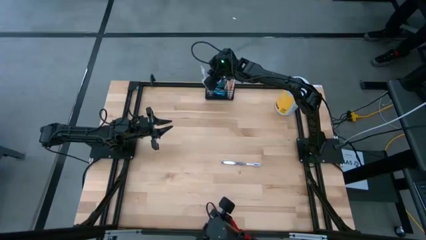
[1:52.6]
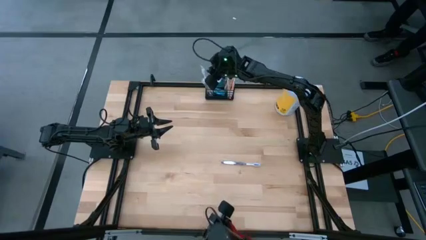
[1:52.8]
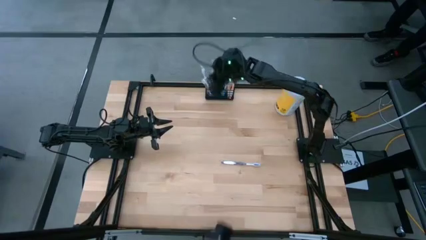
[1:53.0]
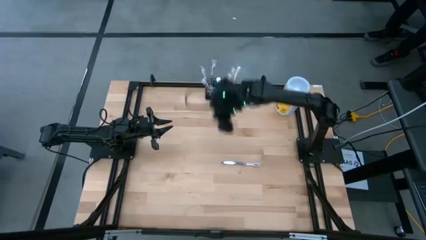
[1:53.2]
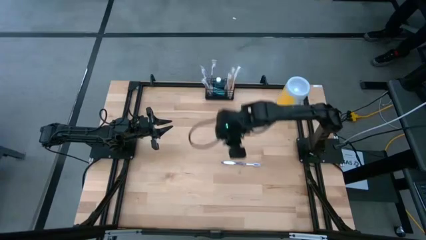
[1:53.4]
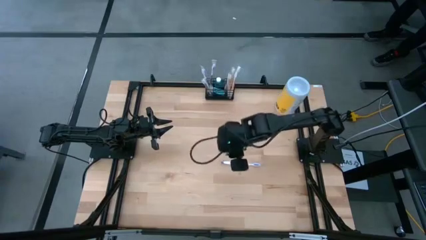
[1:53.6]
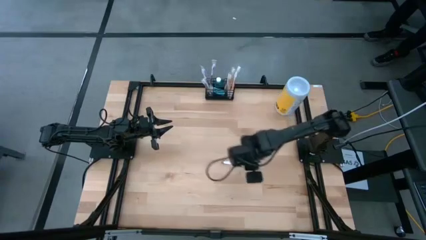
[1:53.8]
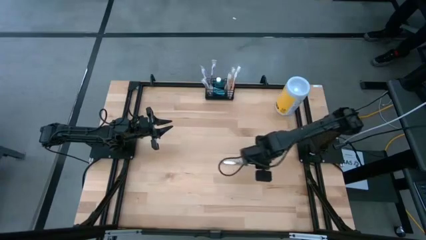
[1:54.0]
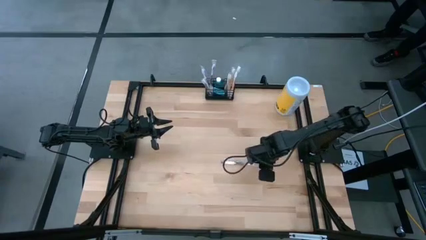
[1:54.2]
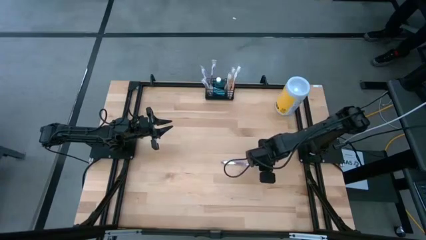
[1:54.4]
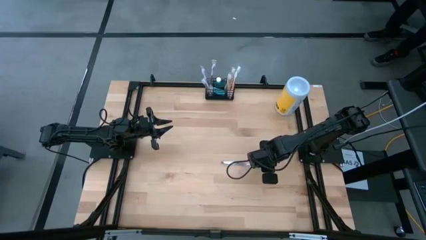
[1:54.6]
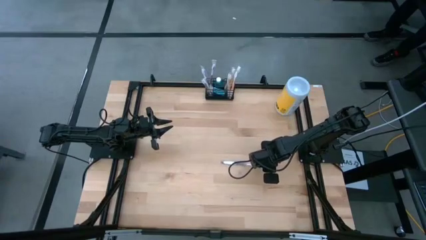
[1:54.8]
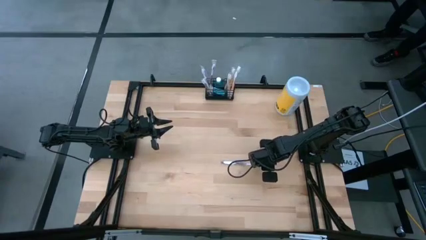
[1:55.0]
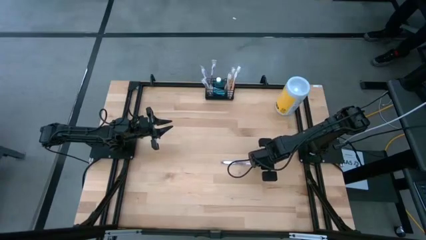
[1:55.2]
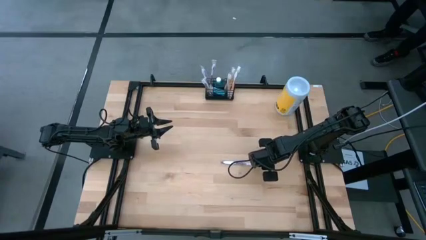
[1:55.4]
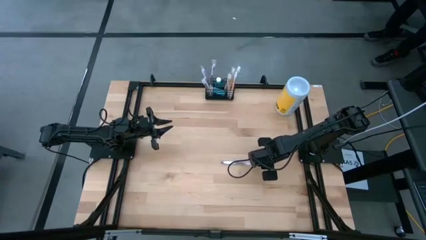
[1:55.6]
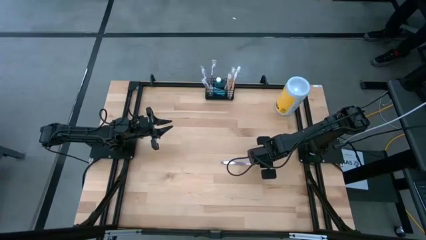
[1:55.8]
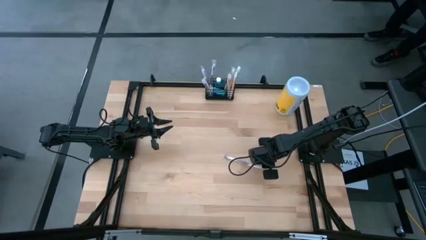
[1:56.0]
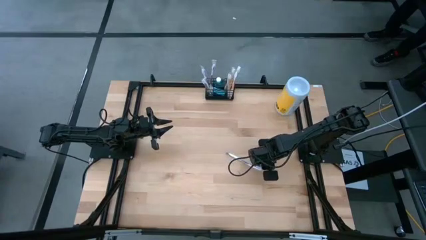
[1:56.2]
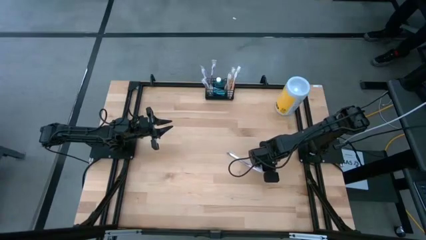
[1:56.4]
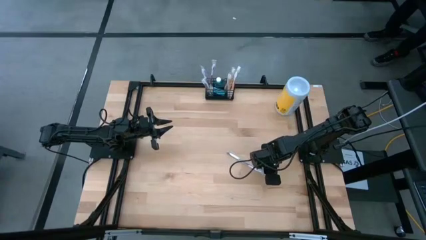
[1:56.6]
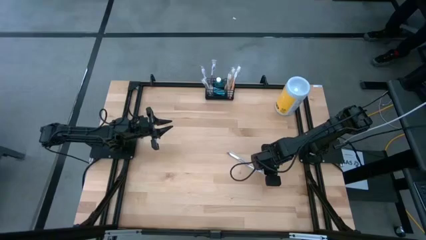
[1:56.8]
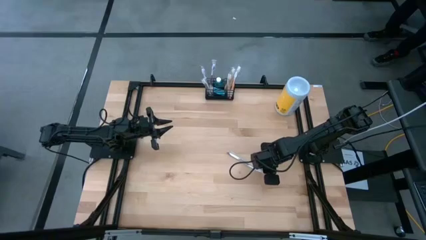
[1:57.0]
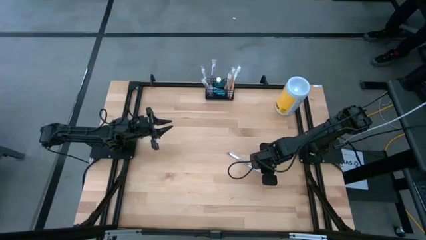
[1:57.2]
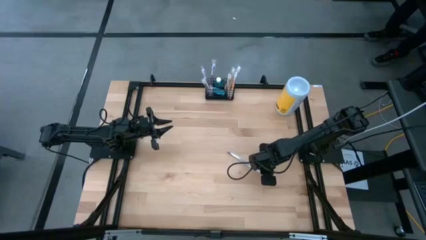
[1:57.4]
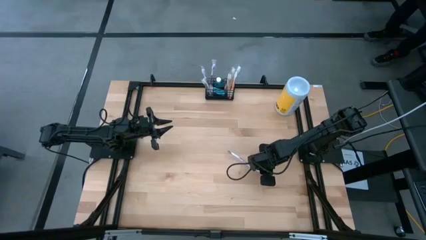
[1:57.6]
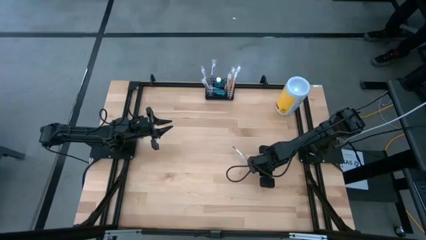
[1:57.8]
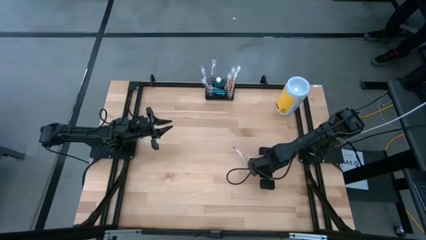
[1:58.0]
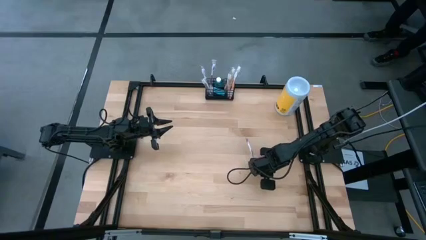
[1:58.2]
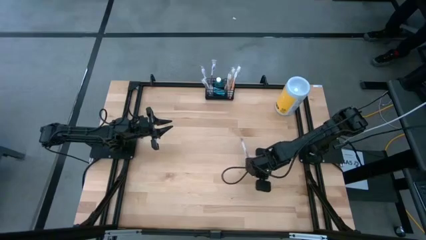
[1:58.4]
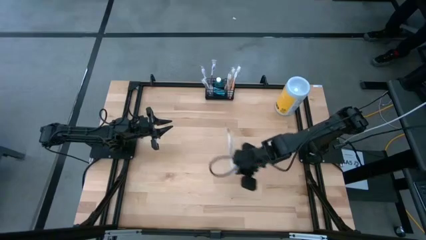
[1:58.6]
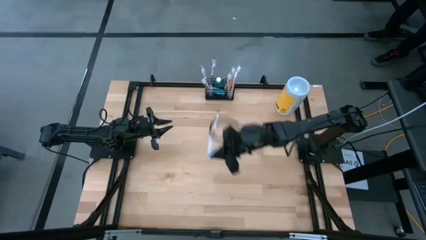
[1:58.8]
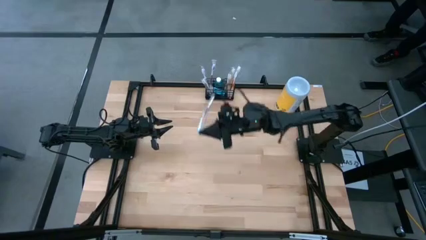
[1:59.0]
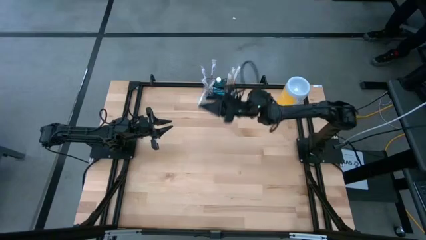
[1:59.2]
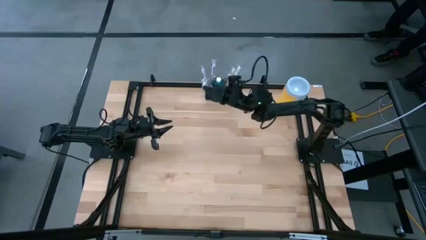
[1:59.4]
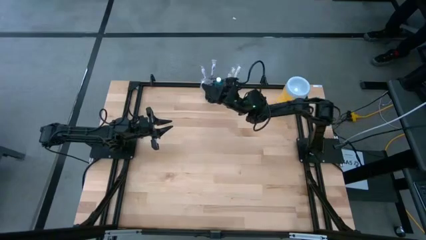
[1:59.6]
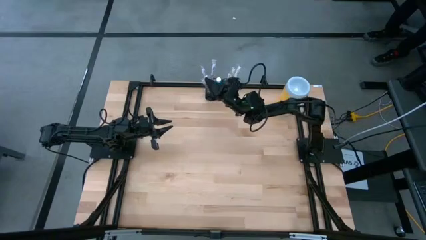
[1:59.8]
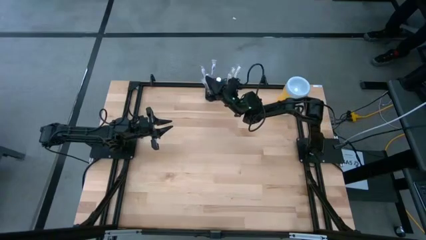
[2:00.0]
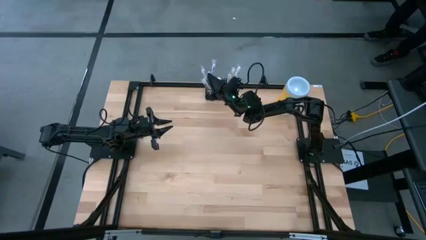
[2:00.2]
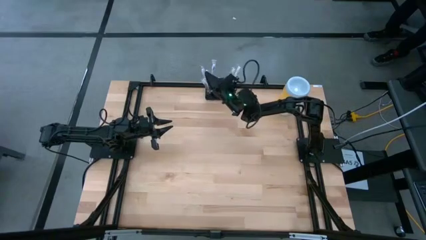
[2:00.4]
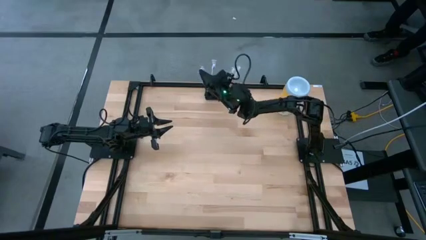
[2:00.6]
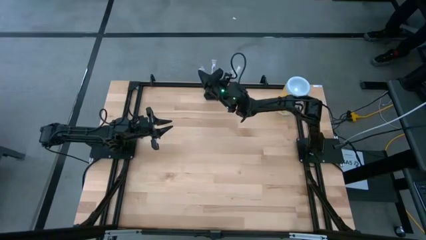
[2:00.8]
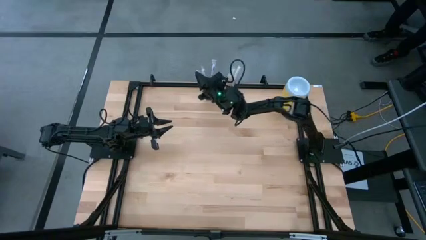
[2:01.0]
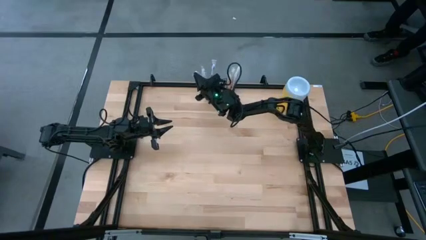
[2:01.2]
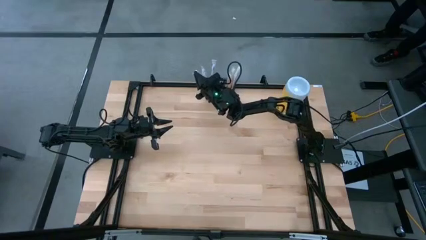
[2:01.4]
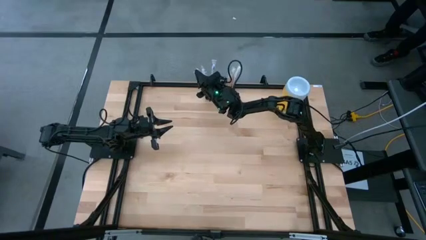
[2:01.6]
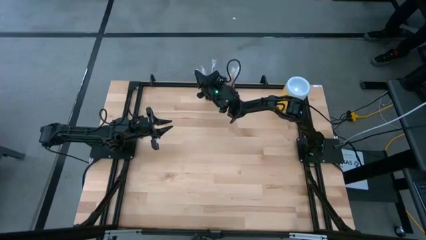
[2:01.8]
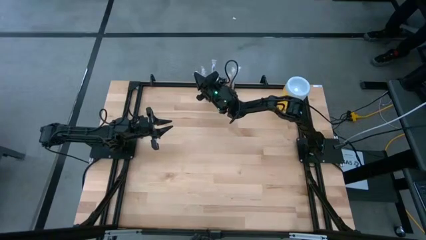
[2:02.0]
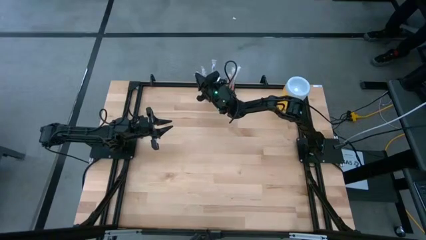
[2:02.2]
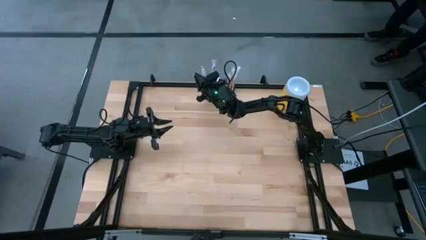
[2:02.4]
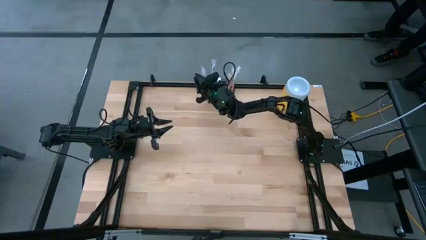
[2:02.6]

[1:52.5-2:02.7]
Task: Pick & Place toothbrushing station
Put the violet toothbrush into the black wire organizer bin

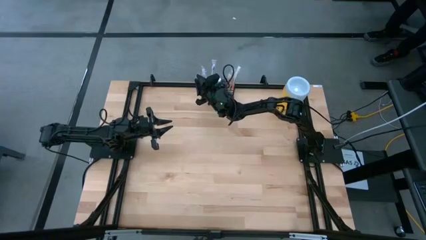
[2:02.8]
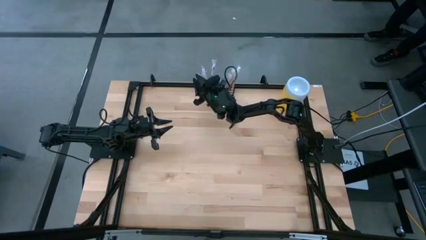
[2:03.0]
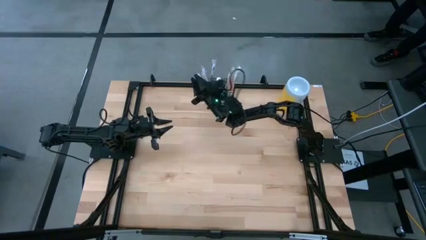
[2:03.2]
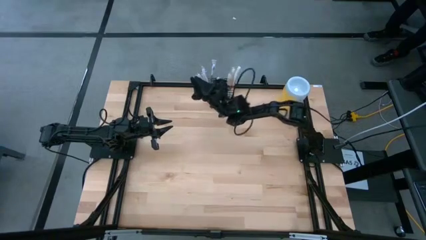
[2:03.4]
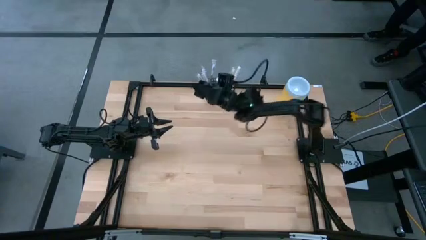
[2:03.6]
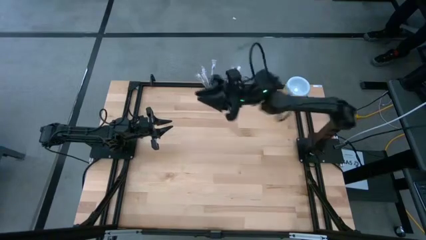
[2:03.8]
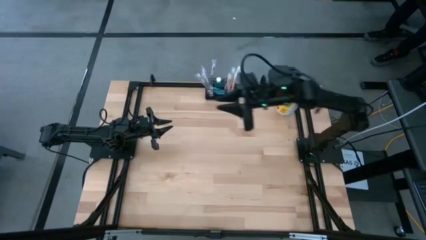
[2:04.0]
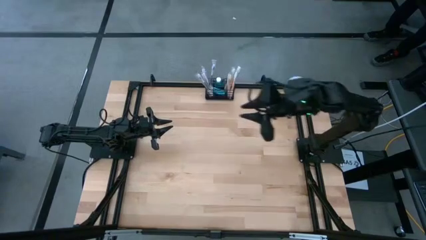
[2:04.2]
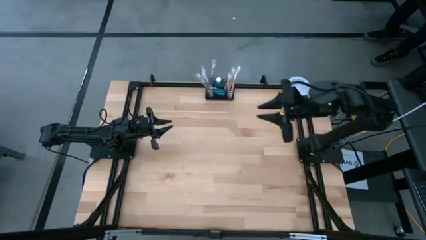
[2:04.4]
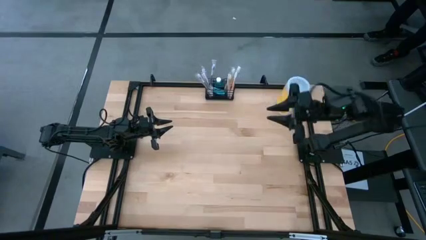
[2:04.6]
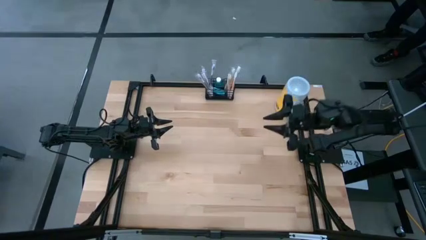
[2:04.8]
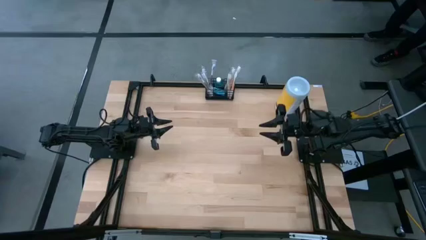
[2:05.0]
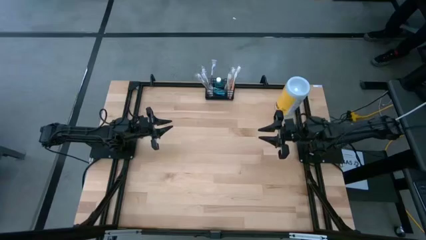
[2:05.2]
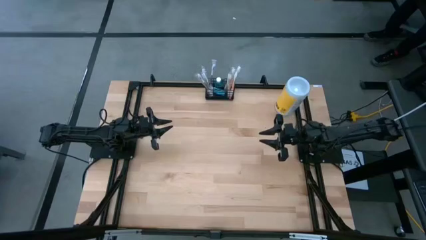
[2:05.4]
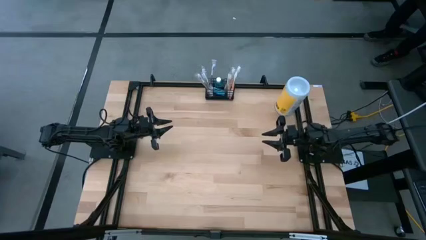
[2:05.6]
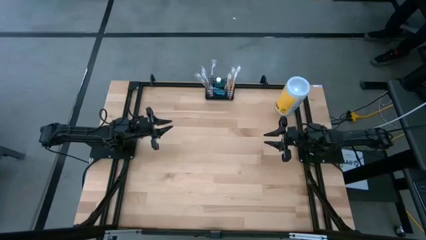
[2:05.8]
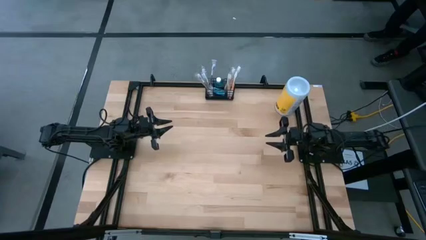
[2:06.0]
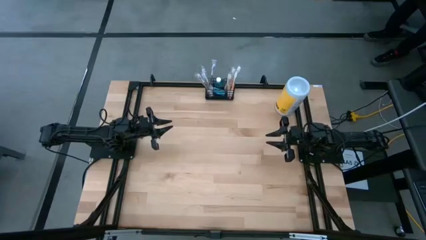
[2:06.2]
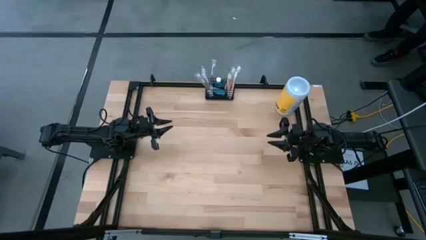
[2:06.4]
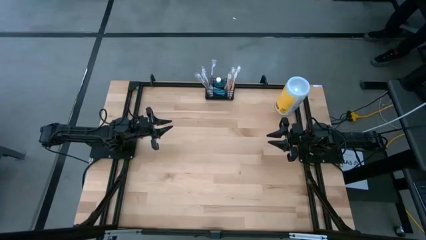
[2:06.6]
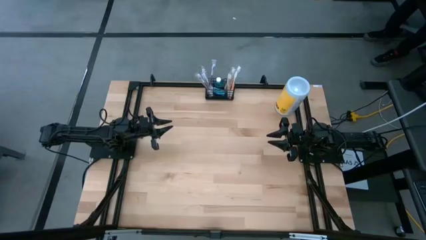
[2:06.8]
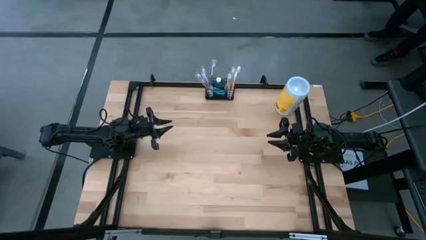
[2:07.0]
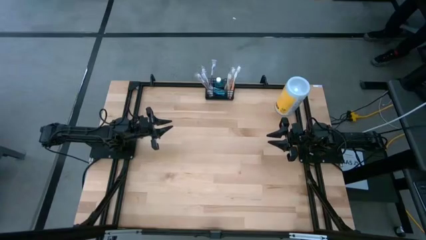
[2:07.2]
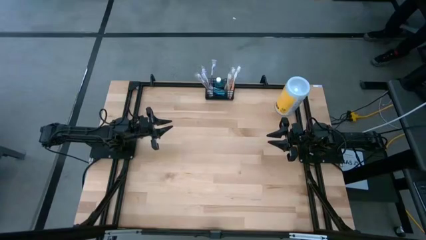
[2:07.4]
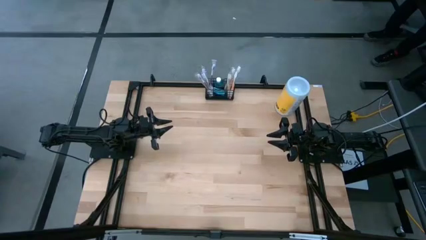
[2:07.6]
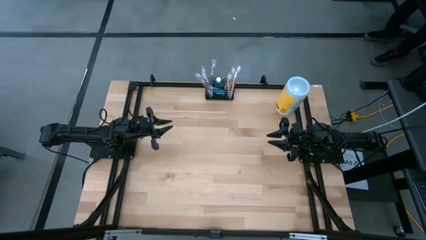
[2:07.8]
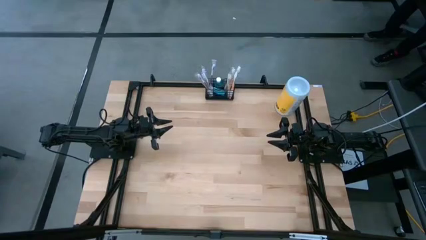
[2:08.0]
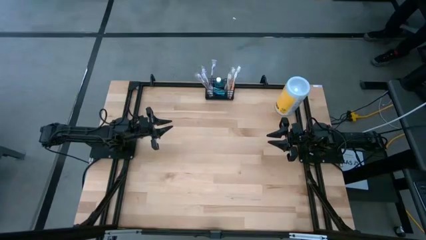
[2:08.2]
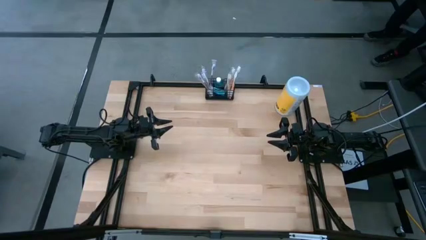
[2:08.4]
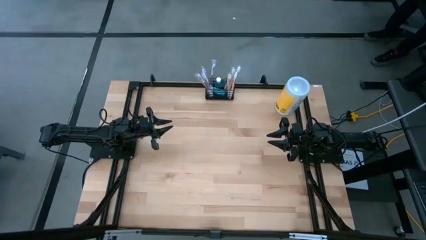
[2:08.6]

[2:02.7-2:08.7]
Return to Home Position
